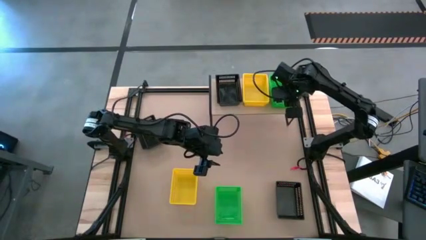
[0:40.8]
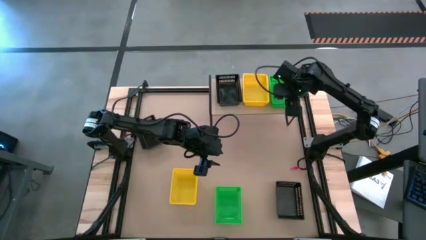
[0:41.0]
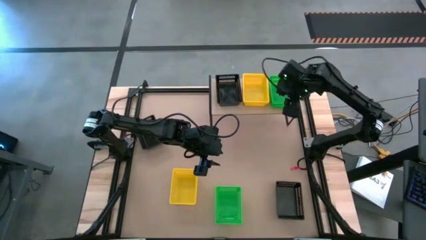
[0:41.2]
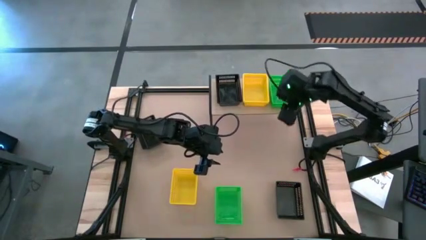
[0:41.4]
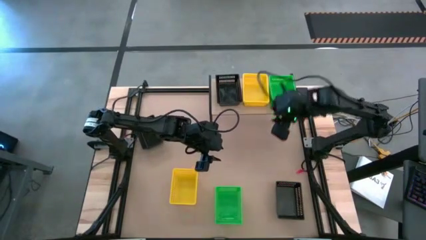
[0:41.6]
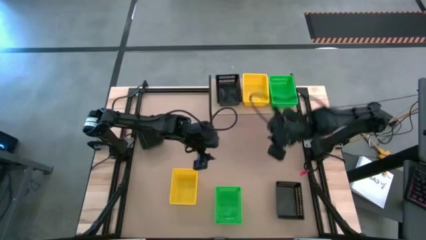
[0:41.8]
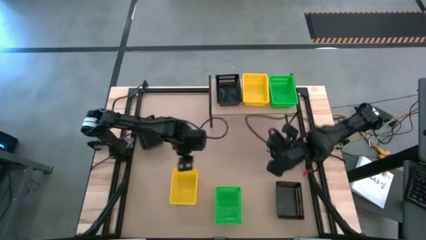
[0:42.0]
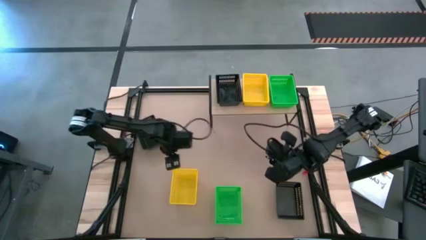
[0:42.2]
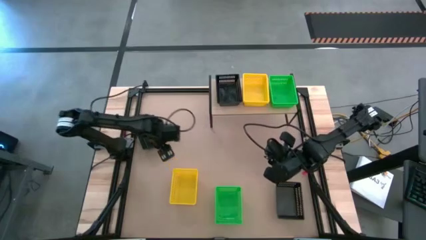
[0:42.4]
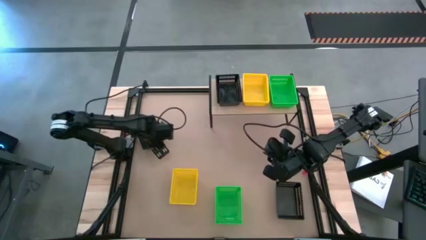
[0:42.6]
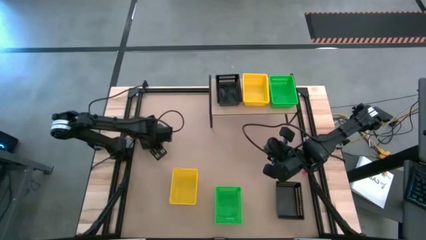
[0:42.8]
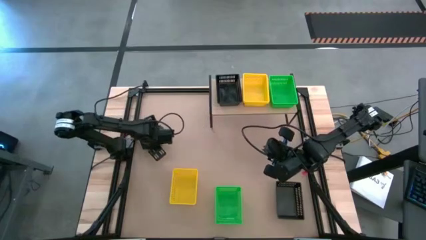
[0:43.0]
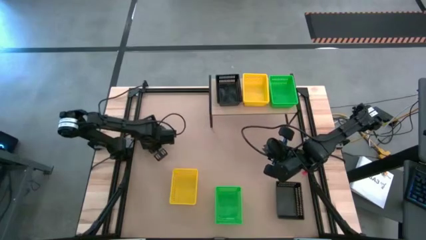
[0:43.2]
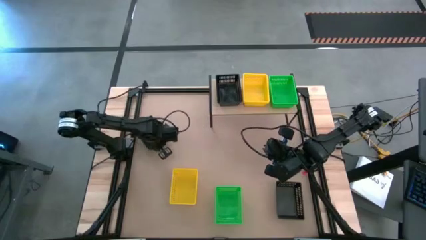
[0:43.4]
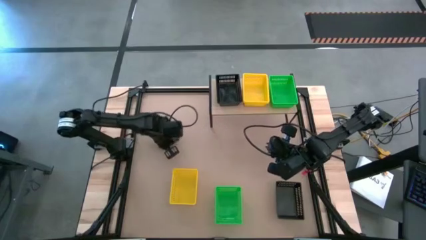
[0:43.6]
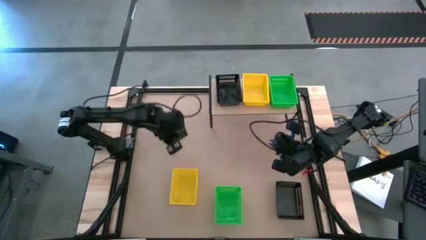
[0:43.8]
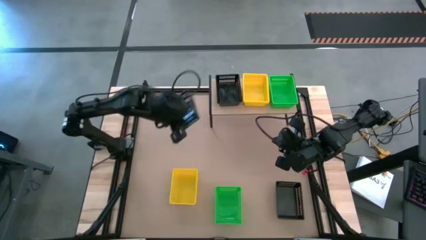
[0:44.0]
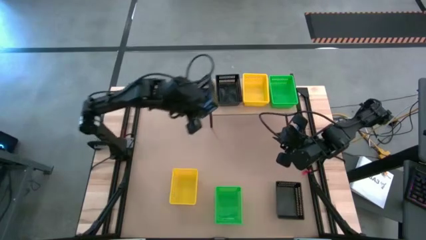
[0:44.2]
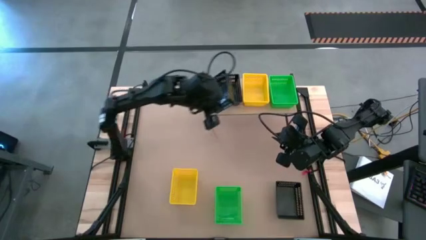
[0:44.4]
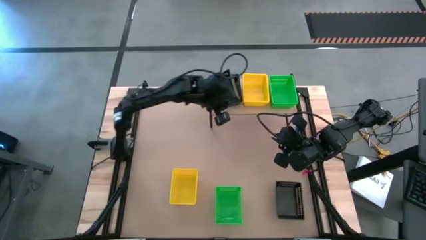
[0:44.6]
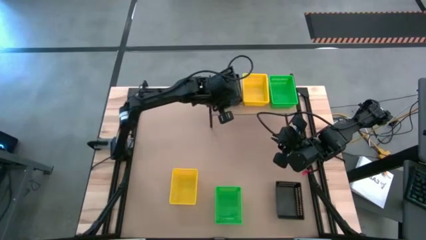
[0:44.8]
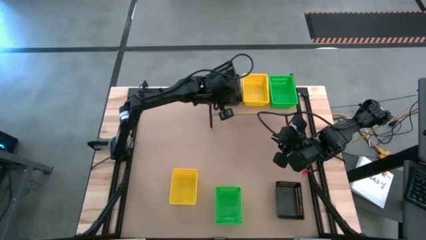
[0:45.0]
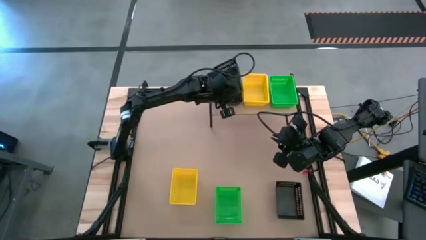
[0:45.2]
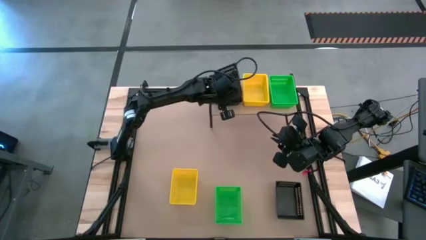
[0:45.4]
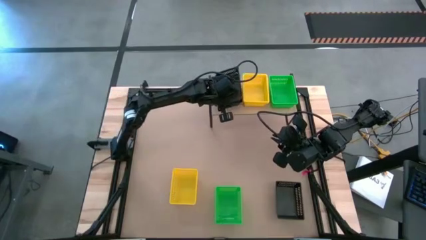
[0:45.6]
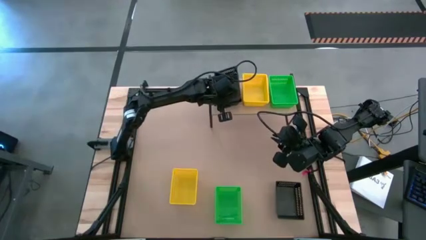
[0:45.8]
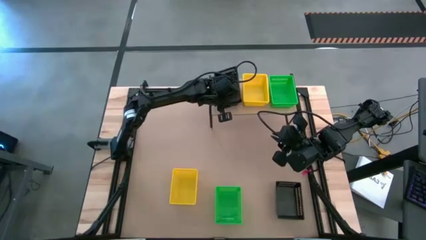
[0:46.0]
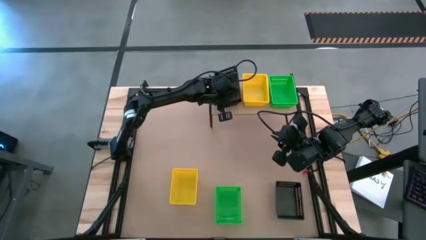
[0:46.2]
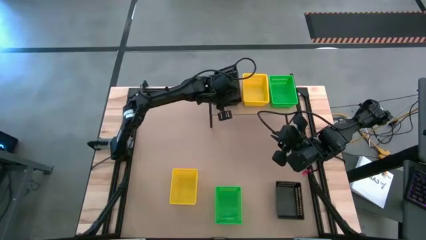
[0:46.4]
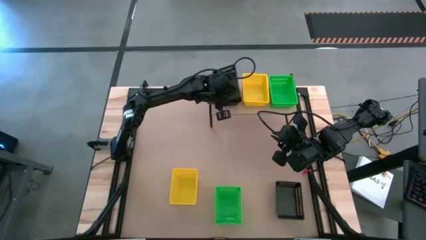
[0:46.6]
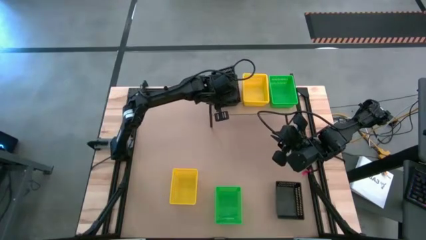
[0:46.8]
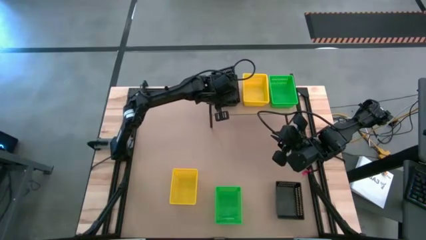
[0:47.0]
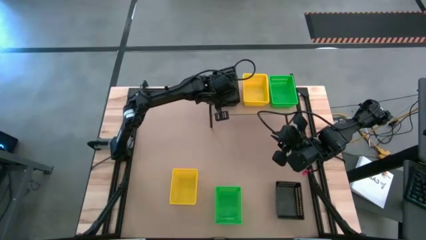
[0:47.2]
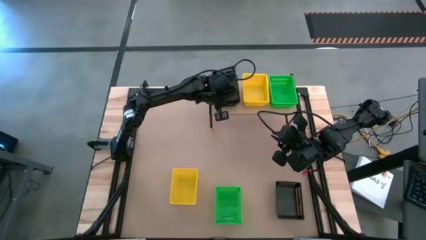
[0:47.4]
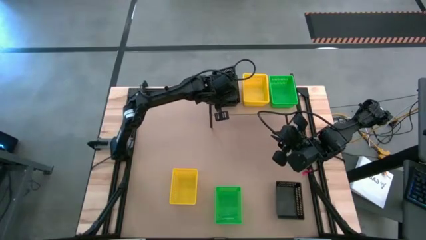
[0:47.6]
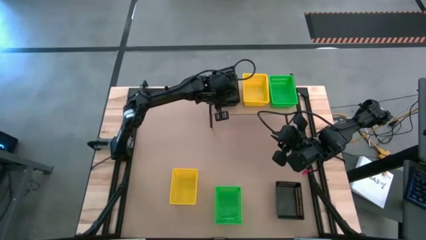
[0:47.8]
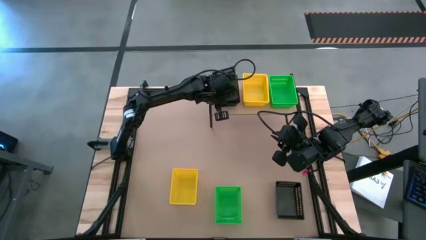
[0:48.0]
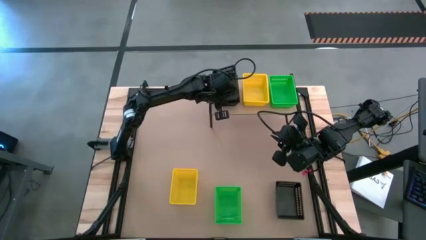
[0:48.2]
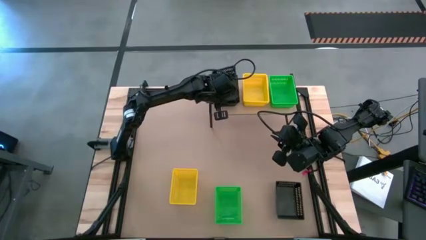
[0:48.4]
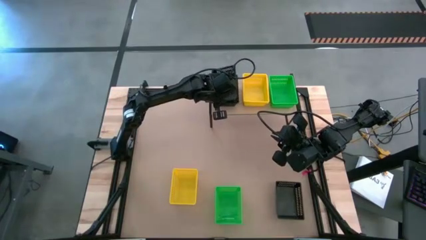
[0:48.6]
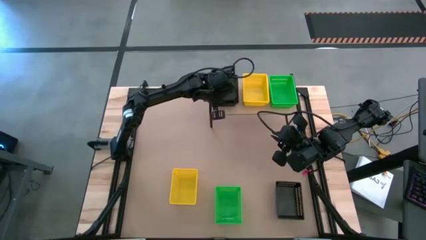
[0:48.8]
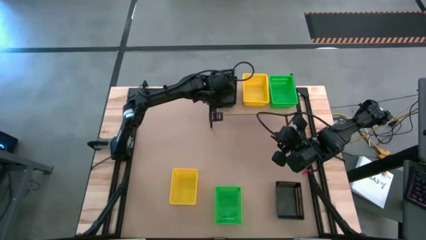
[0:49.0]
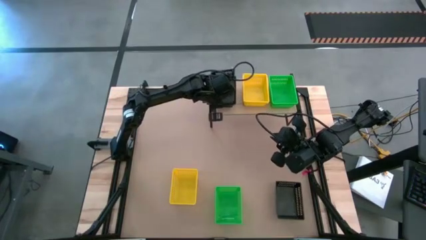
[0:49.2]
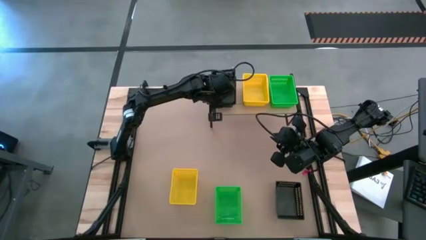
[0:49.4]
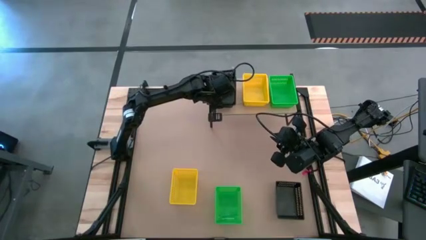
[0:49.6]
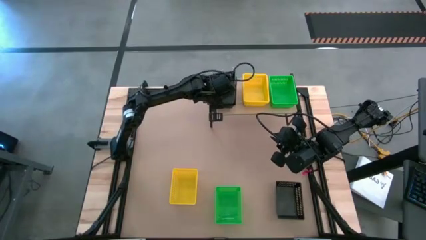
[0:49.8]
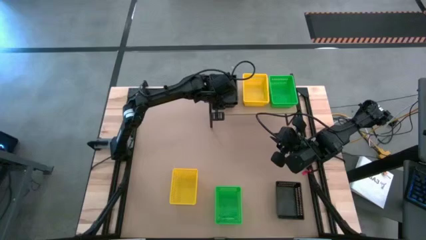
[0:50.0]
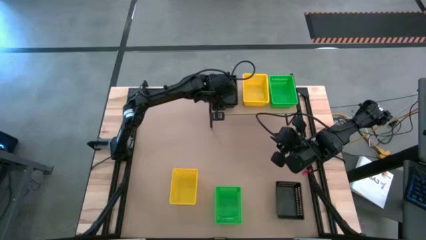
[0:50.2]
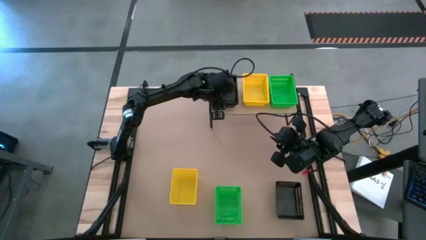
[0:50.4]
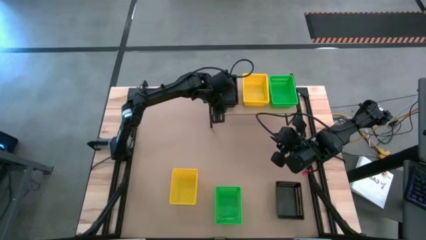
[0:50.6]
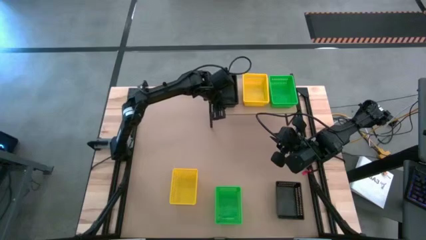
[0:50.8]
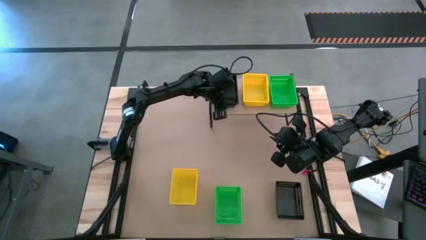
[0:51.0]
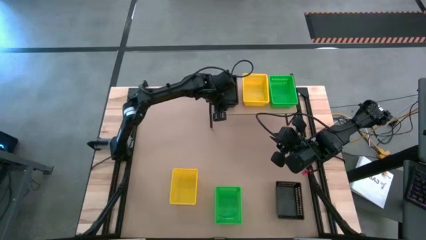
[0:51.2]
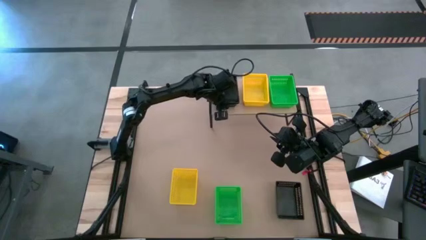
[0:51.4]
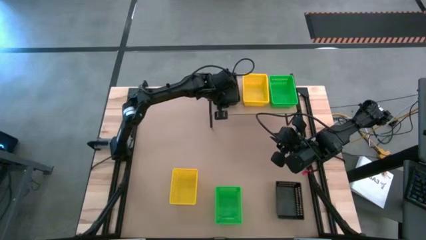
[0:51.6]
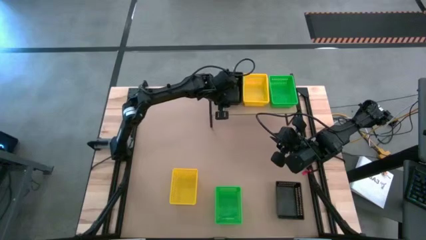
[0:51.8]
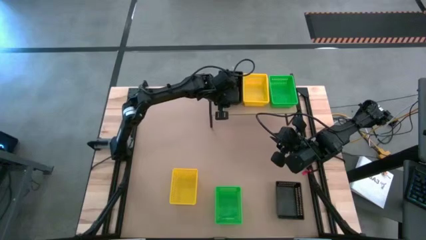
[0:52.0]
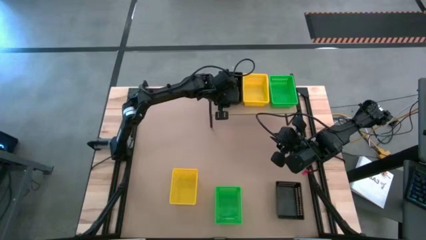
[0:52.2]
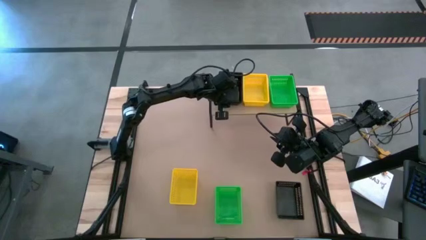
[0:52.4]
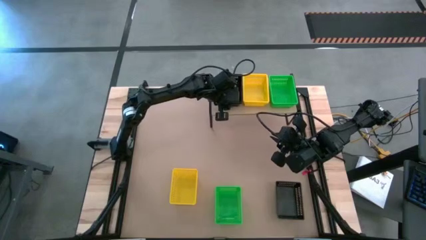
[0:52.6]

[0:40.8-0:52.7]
Task: Stack baskets on shelf by color
Stack the top black bin on top of the black bin on the shelf

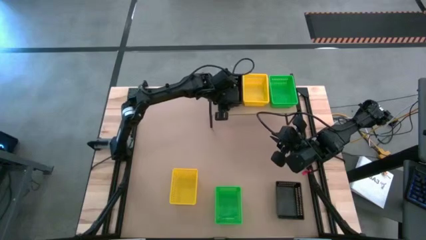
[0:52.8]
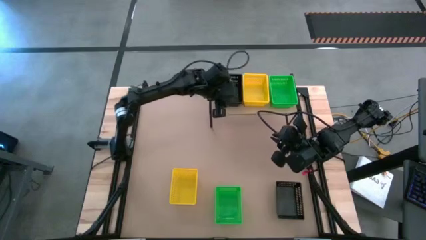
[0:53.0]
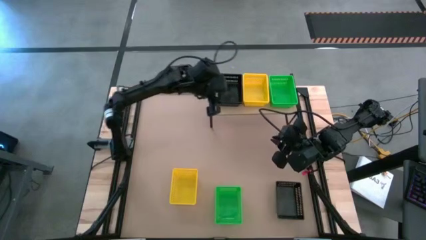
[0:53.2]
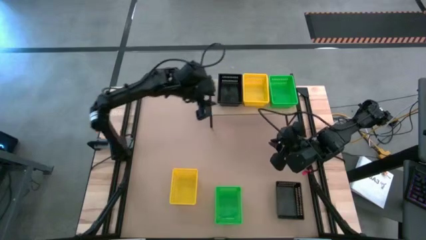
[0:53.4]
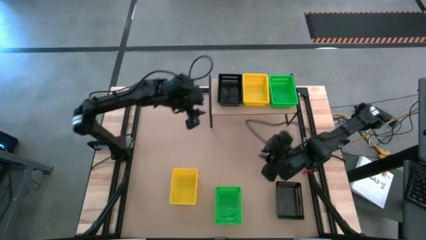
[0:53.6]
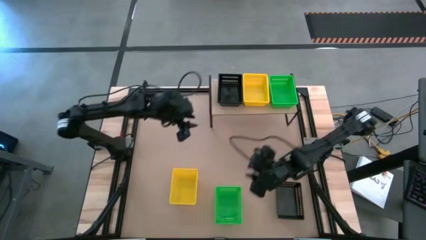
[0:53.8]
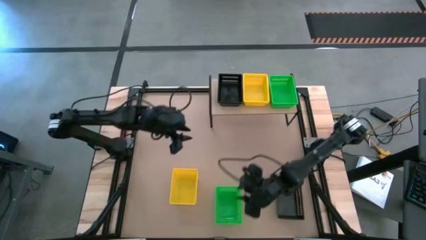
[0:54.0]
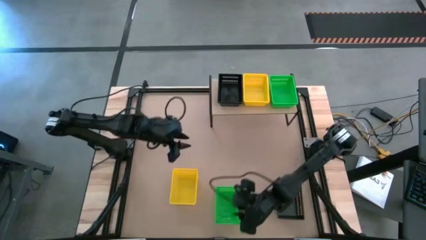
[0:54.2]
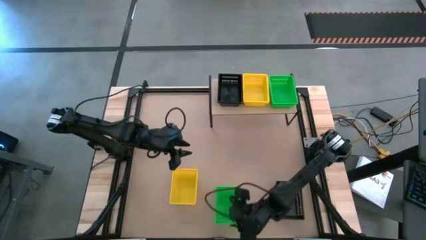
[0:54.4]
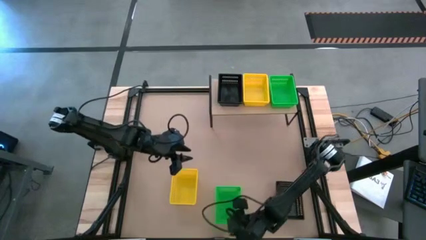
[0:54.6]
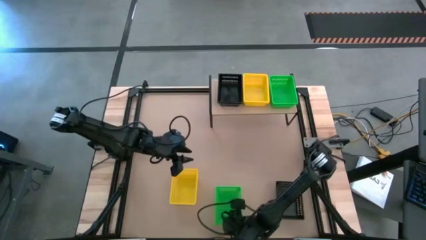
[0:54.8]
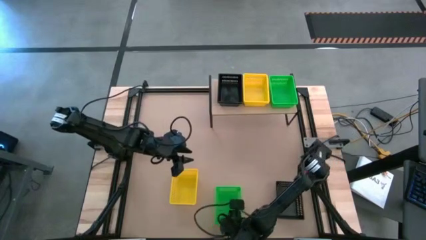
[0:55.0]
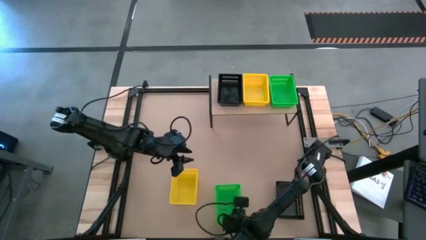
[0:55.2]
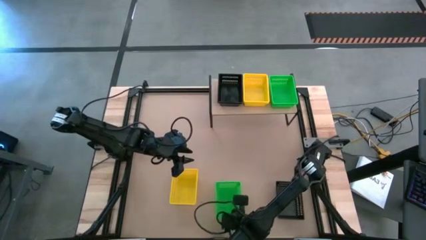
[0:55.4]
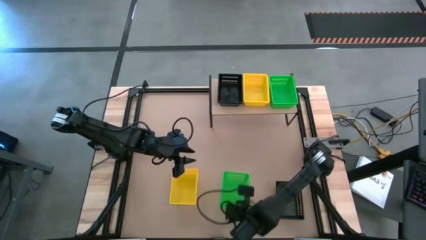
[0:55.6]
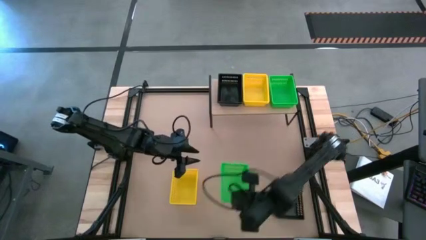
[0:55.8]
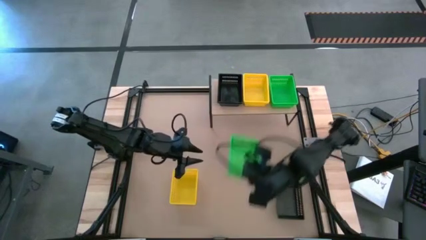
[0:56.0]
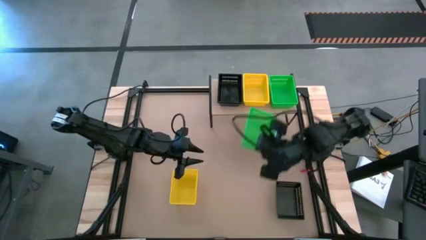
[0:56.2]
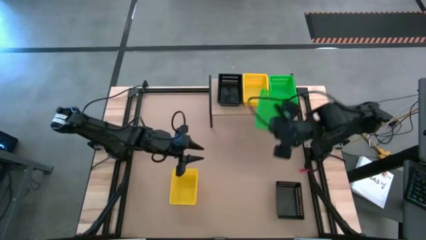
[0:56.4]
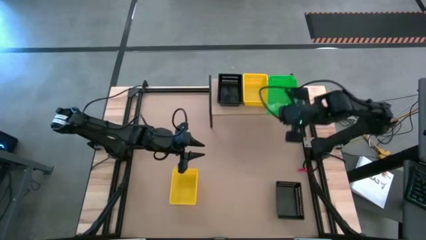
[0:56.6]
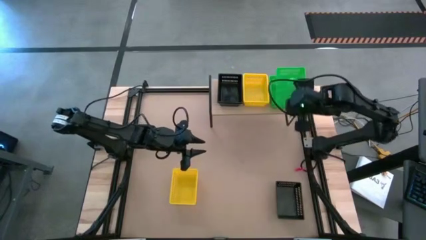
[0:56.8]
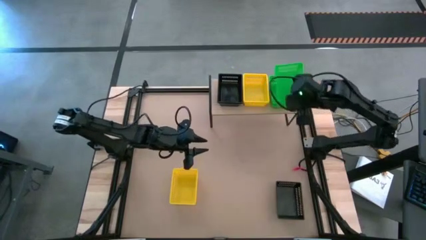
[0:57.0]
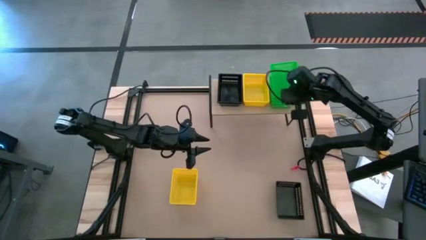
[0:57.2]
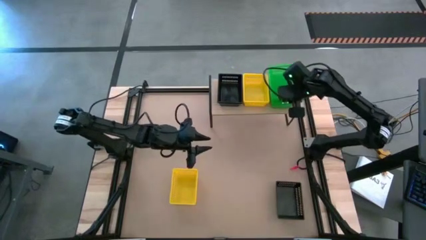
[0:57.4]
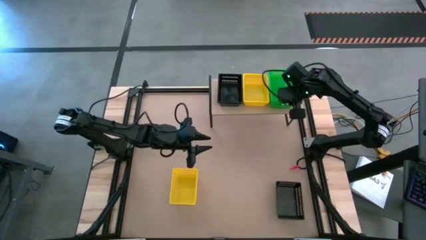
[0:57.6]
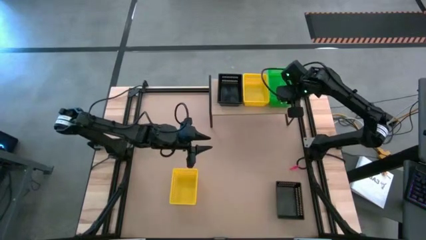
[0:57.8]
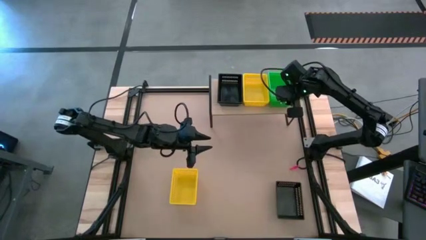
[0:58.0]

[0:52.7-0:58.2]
Stack the green bin on top of the green bin on the shelf
